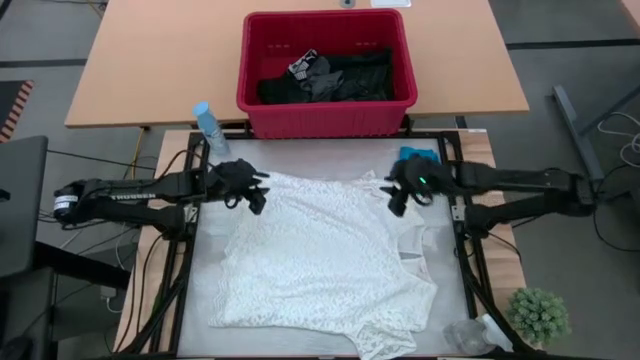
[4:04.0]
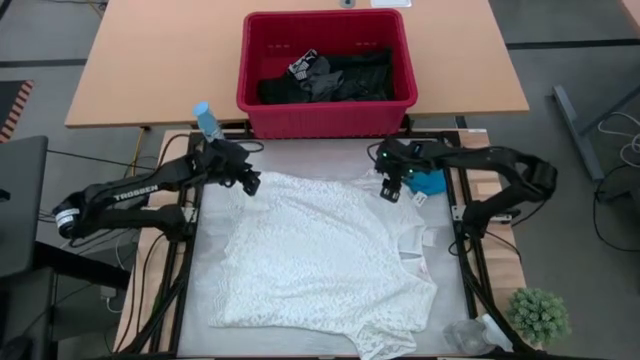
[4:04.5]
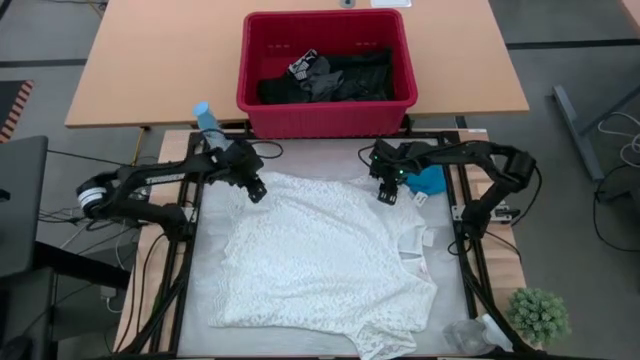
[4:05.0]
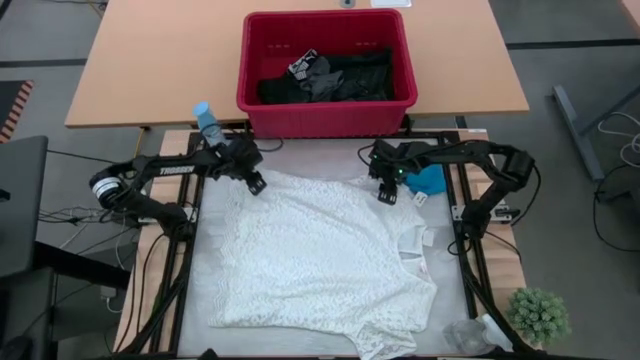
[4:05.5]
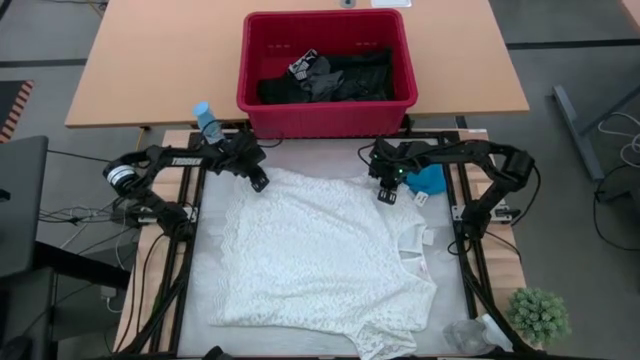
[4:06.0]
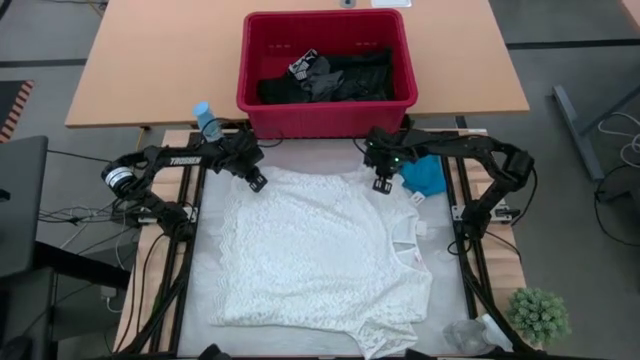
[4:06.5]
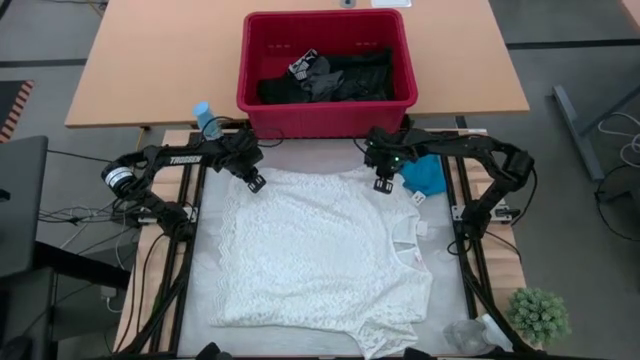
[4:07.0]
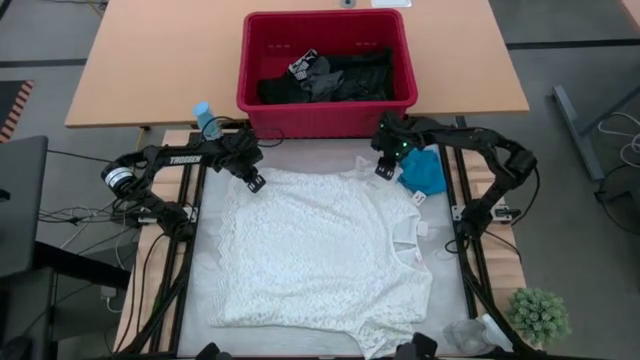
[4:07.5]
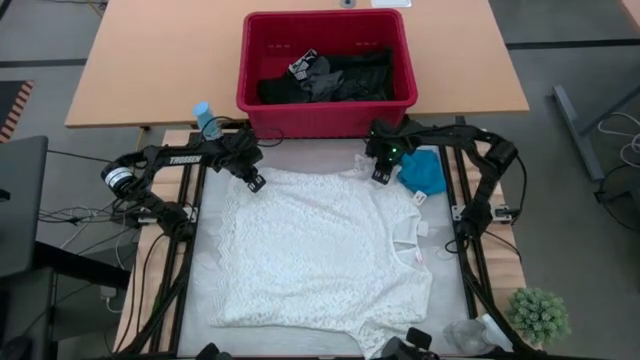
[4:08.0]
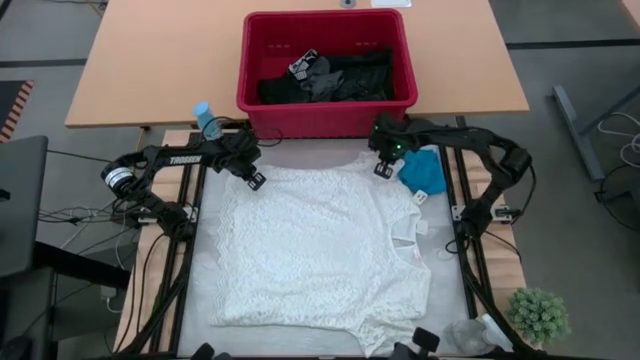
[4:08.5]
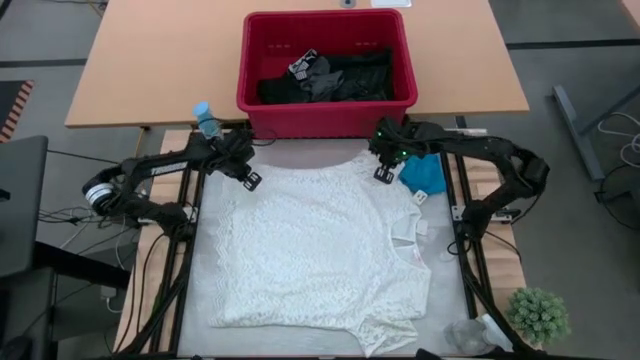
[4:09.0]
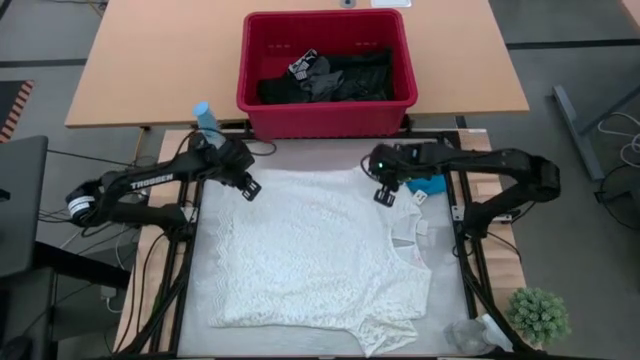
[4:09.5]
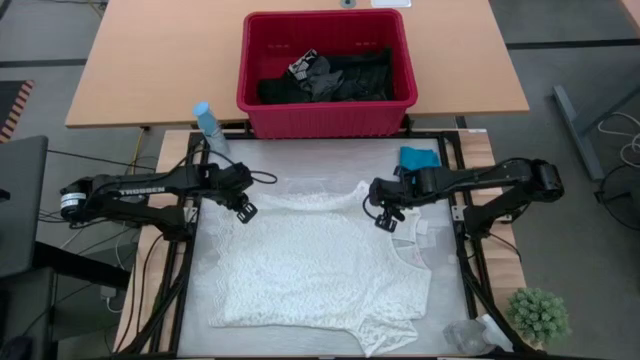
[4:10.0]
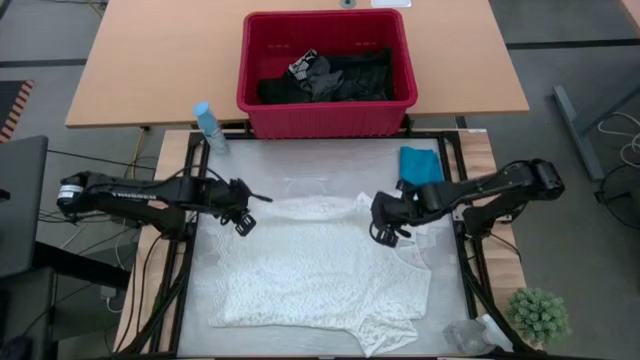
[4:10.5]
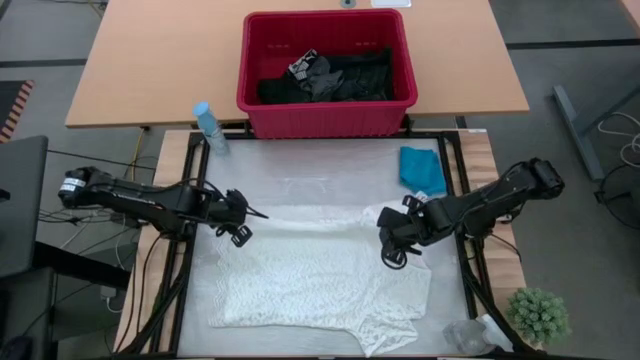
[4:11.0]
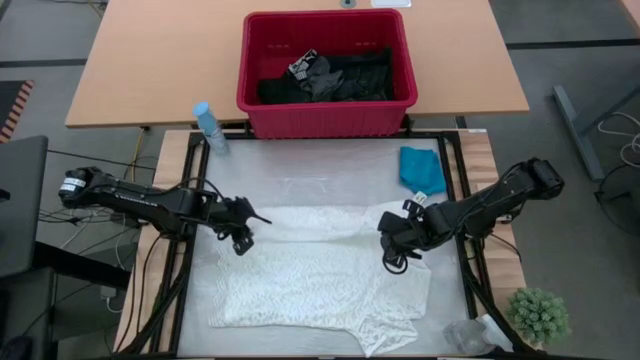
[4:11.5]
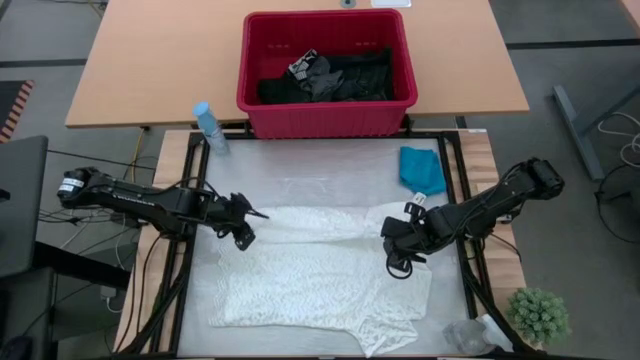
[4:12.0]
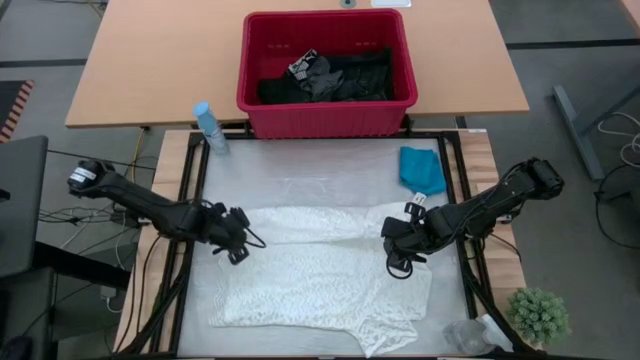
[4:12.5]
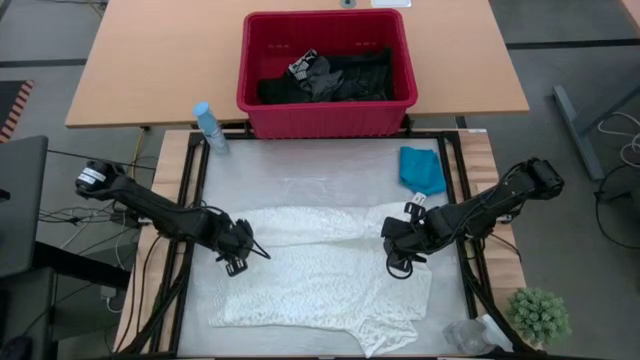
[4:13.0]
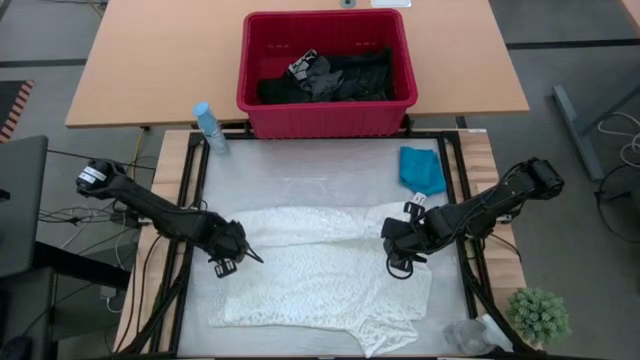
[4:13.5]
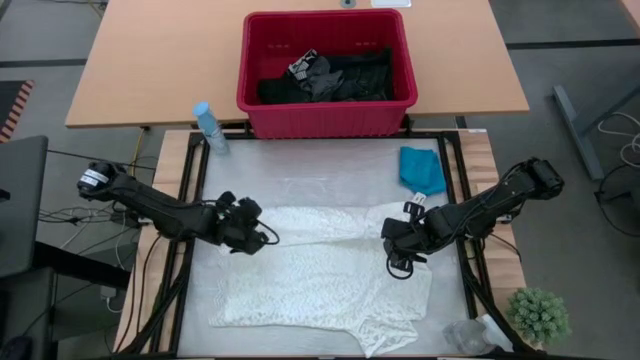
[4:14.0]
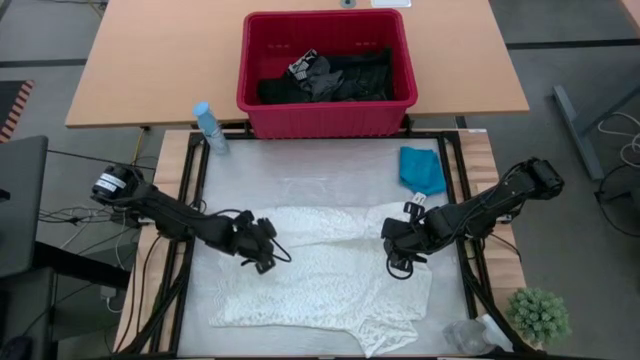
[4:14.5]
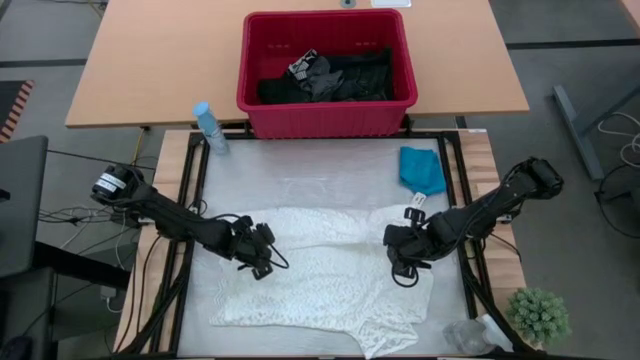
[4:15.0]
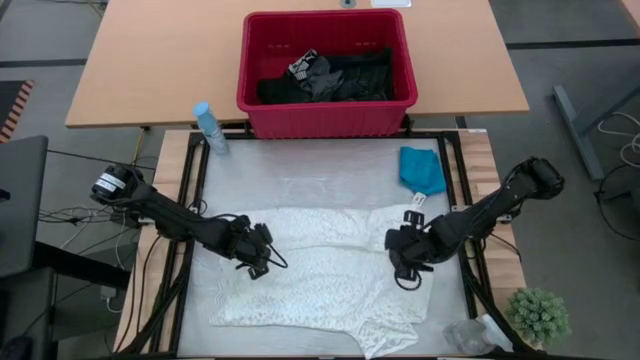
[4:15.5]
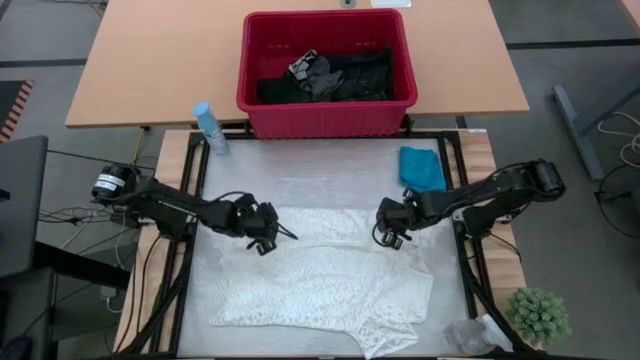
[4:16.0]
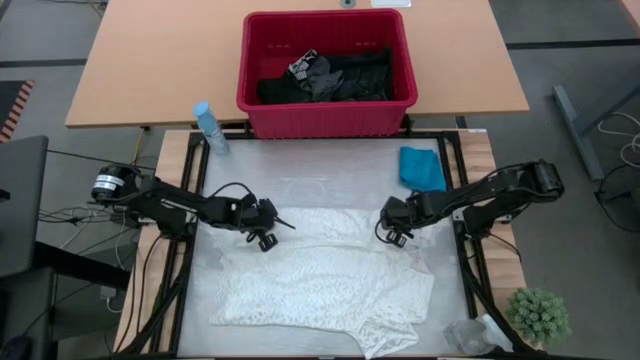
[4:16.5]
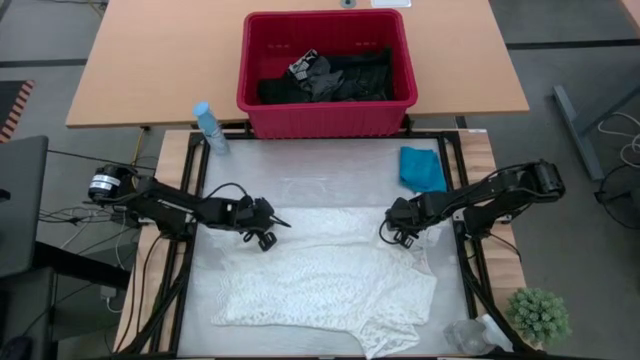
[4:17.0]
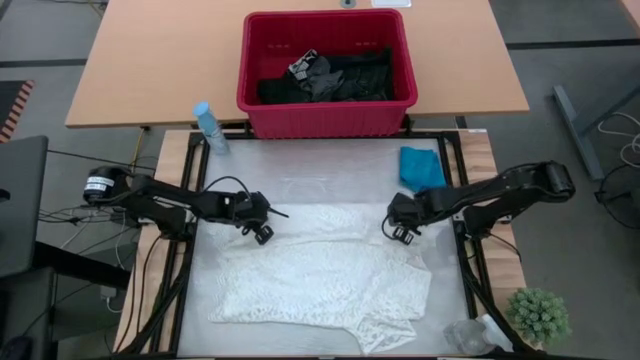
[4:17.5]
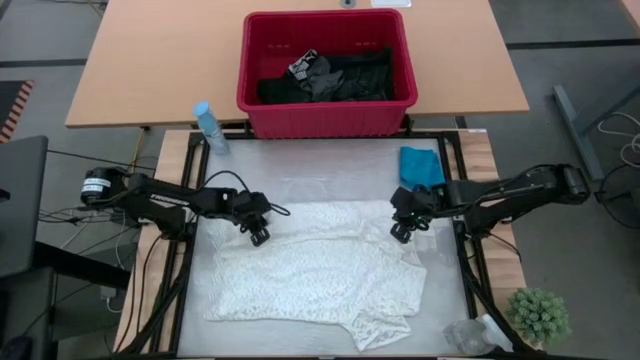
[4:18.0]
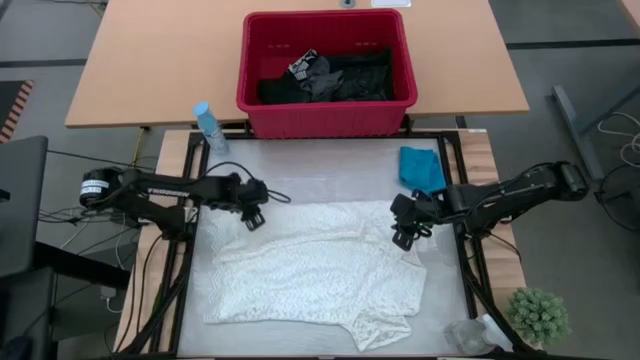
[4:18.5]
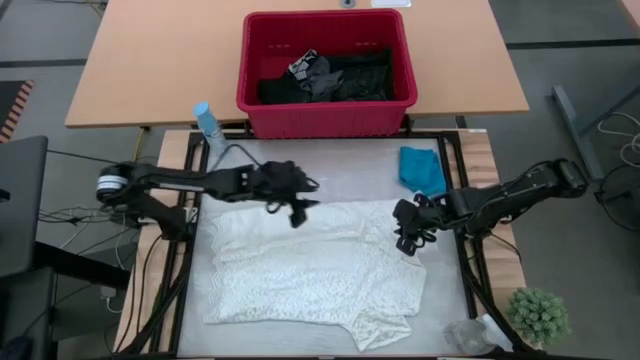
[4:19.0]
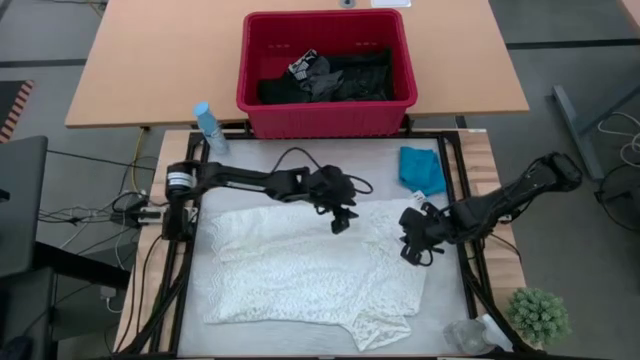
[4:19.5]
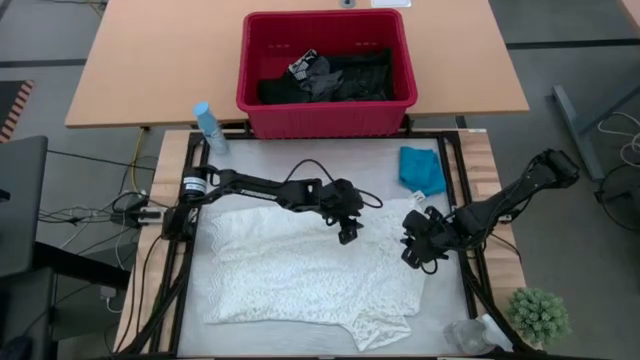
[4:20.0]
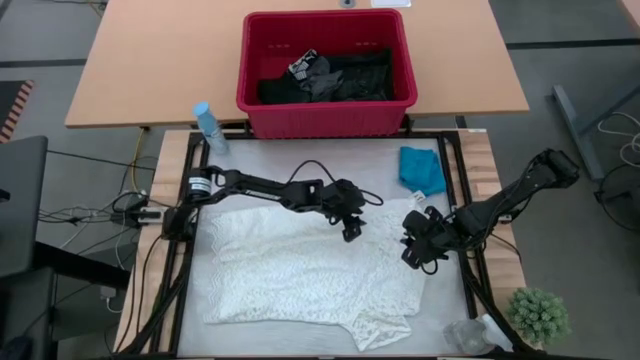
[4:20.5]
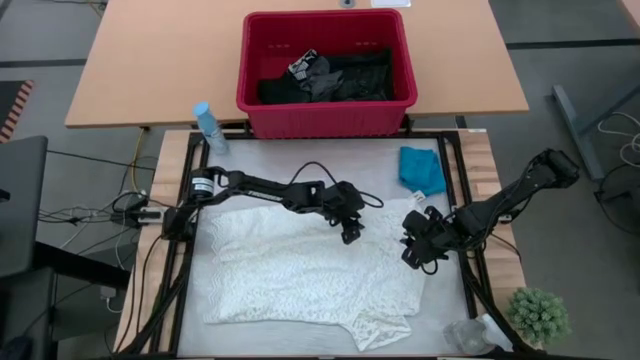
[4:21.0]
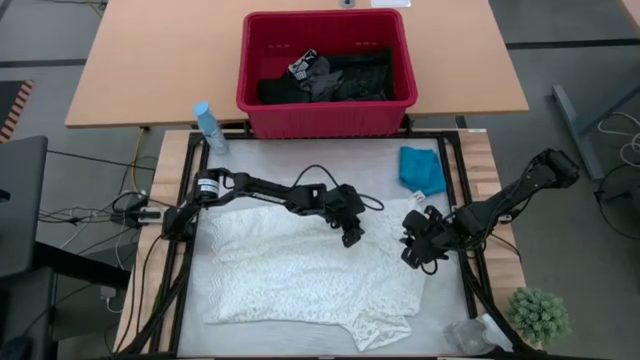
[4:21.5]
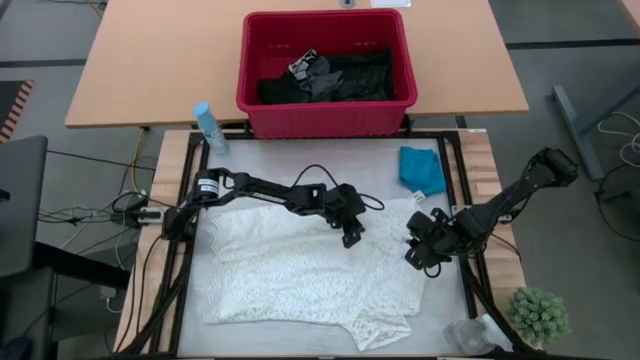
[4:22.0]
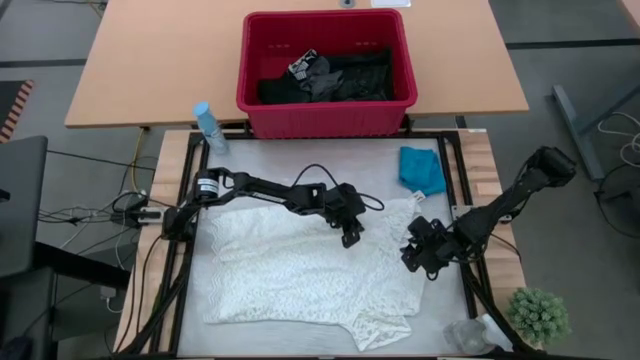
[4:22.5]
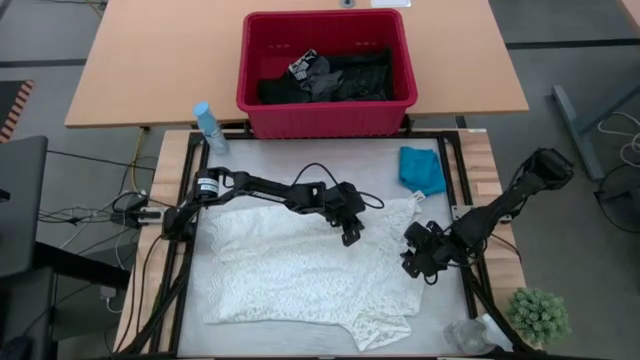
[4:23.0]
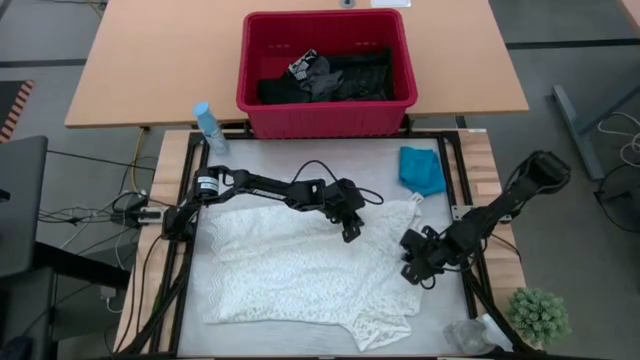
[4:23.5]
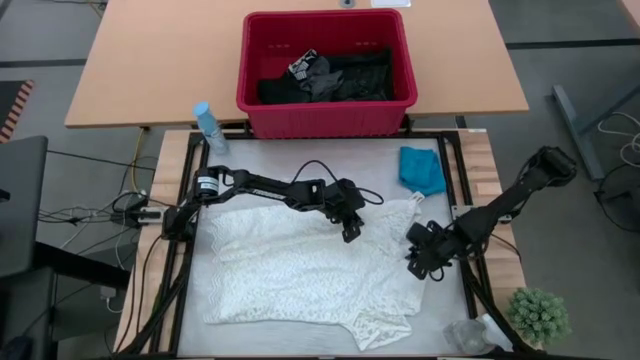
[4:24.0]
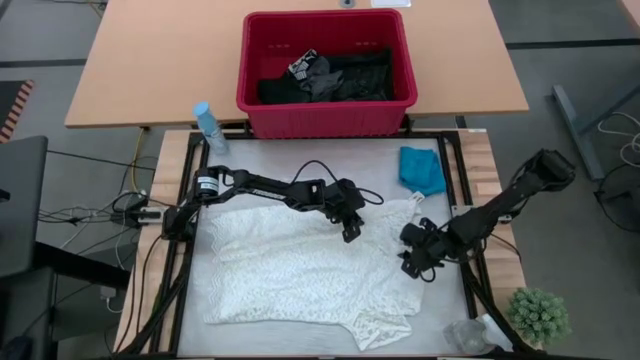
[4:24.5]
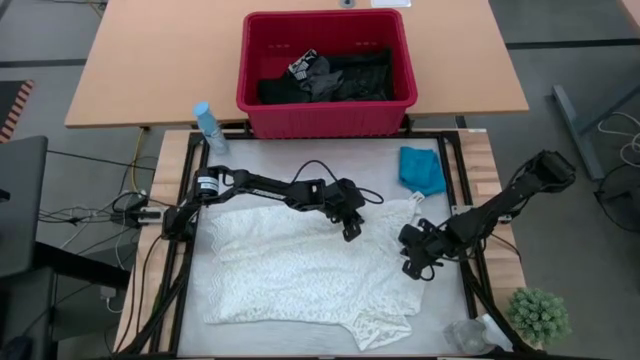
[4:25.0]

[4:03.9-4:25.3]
Task: Fold laundry
Fold the white shirt

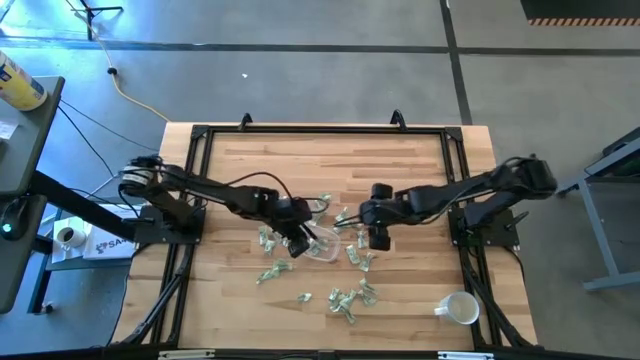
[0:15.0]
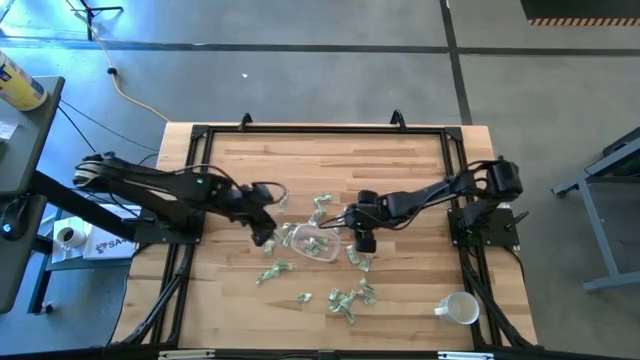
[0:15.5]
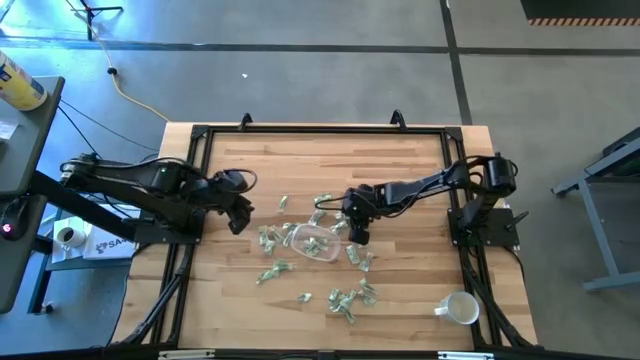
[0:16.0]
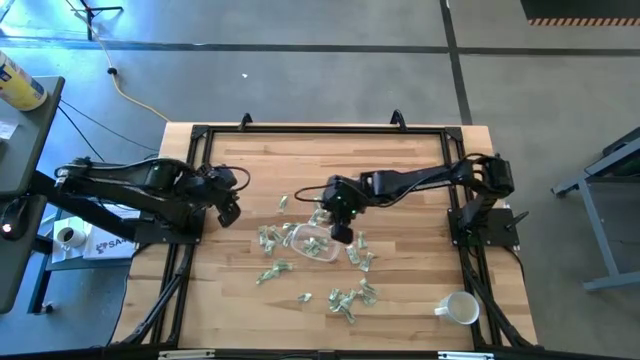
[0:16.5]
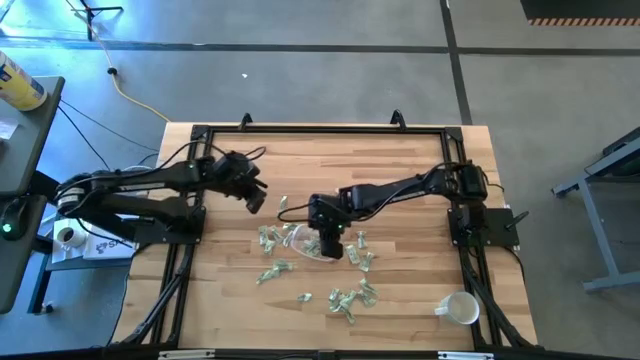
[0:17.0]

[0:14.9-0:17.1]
Task: Pick and place Stevia / Truvia into bins
Put the green stevia packet into the transparent bin
